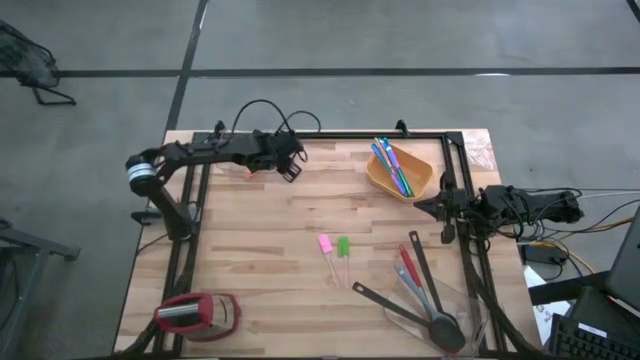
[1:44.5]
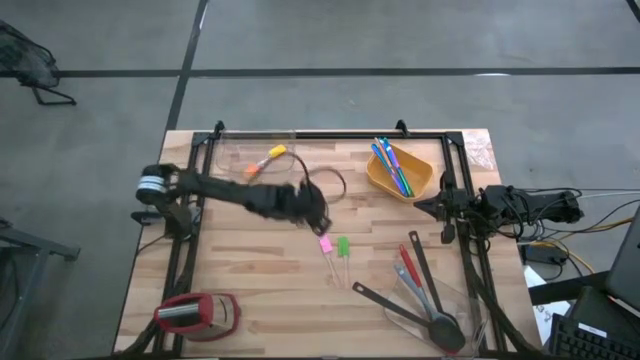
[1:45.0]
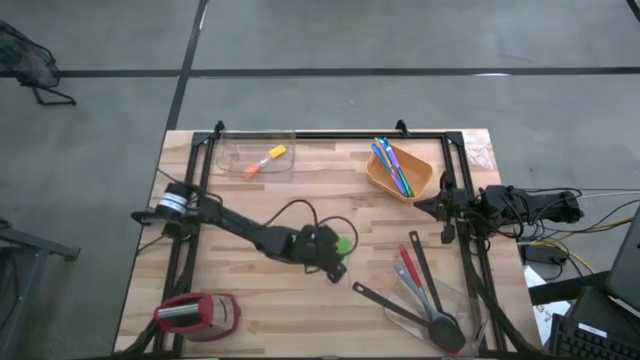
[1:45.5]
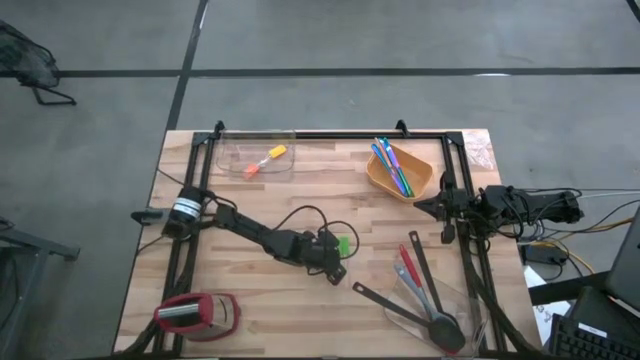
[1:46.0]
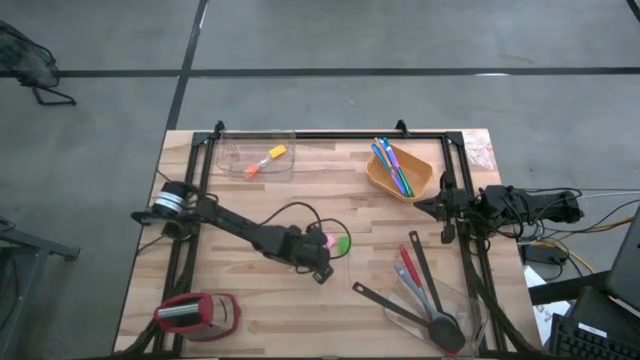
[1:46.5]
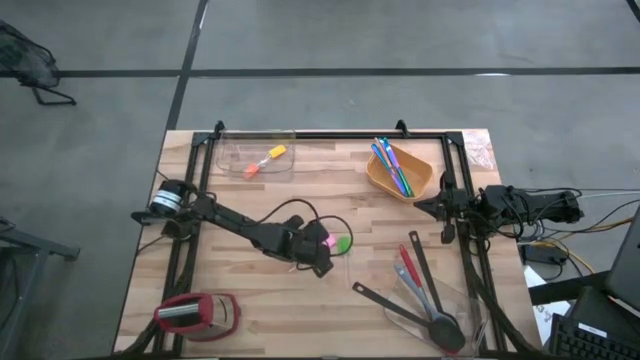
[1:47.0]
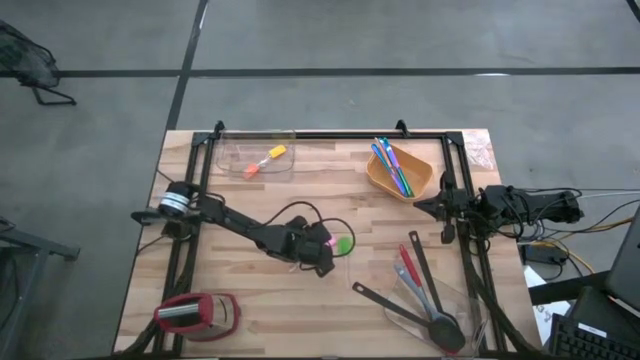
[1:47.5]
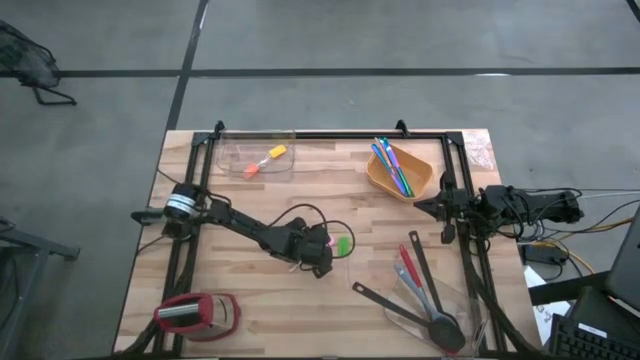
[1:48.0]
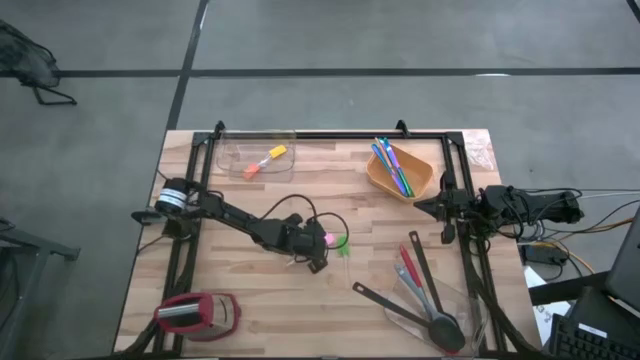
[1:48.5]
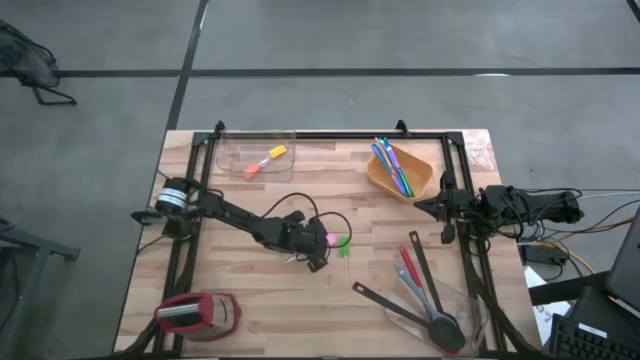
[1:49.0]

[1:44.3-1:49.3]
Task: Pick & Place Kitchen Items
Put the pink spatula into the top transparent bin

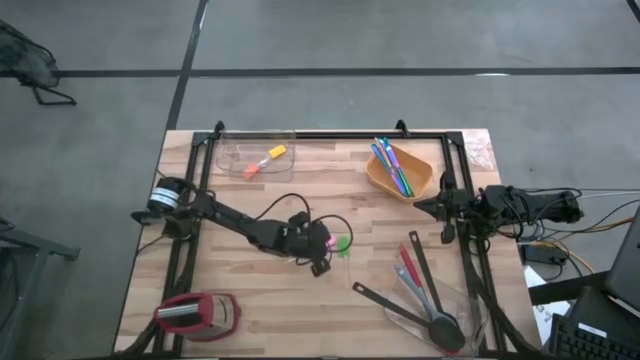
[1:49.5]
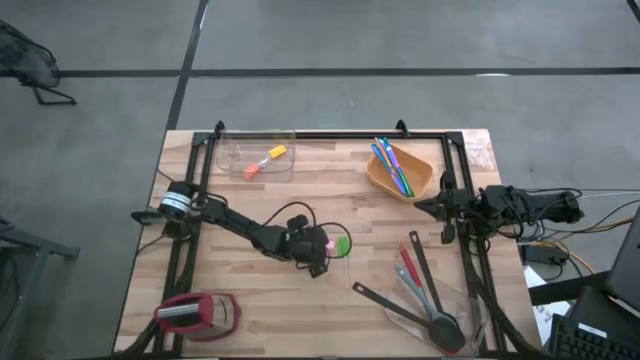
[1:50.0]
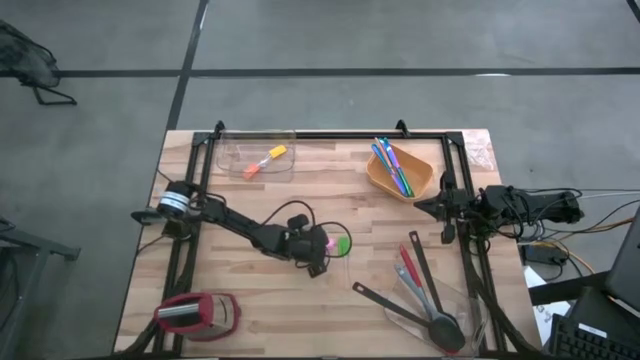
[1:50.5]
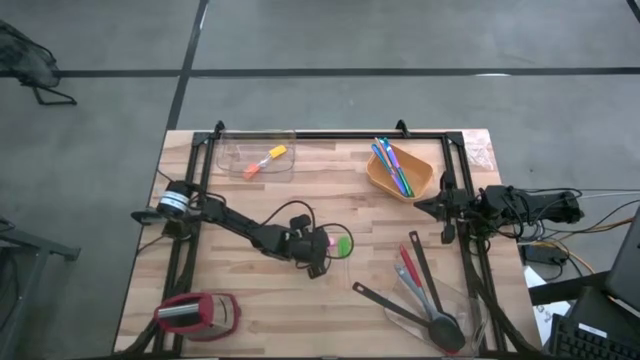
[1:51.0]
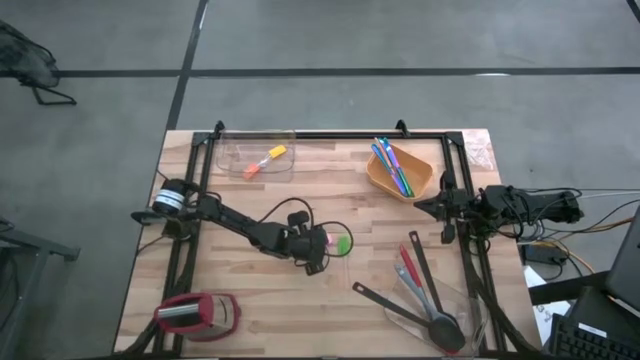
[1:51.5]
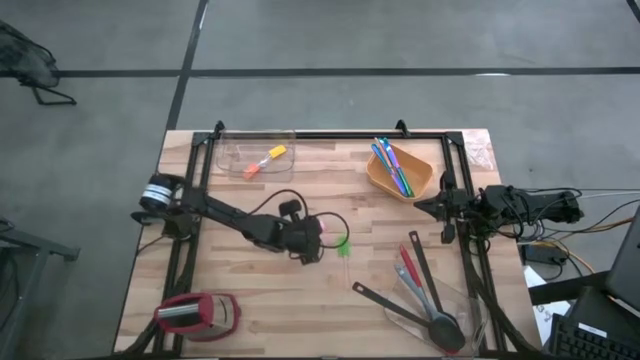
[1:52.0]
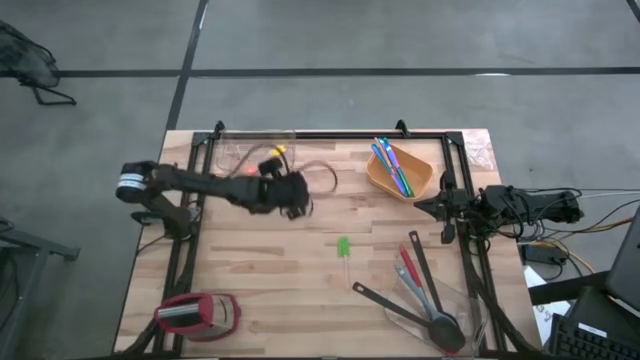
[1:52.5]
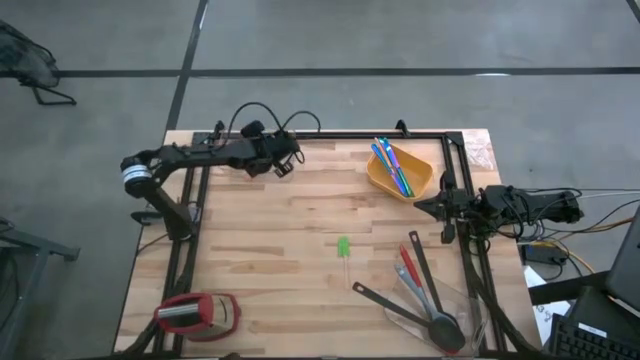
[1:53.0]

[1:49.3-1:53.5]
Put the pink spatula into the top transparent bin

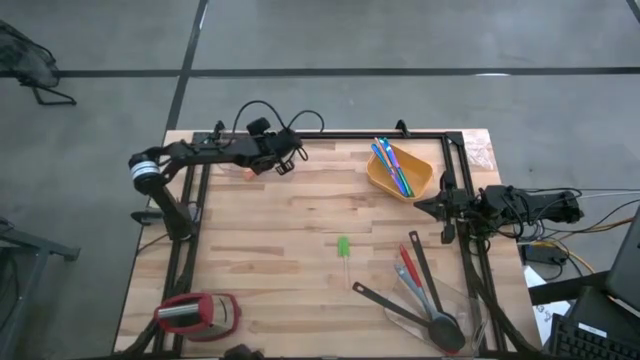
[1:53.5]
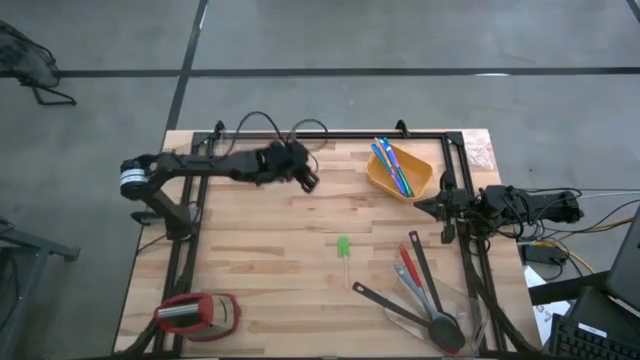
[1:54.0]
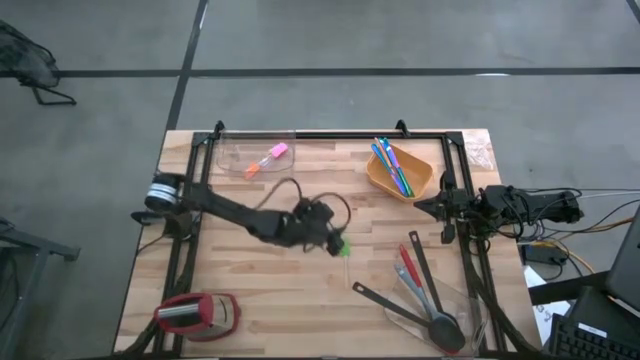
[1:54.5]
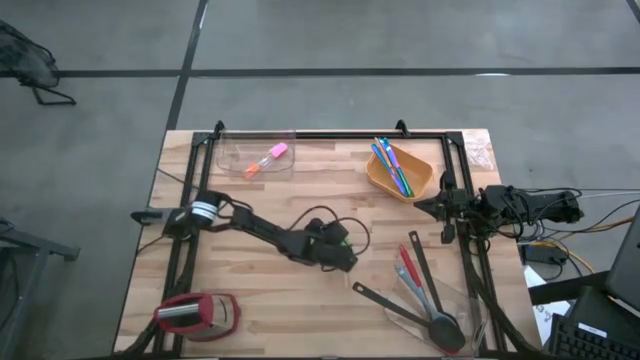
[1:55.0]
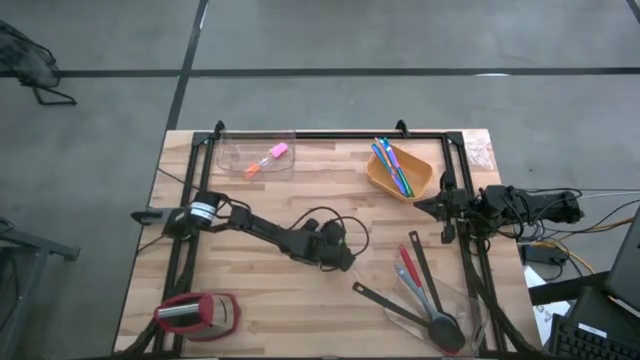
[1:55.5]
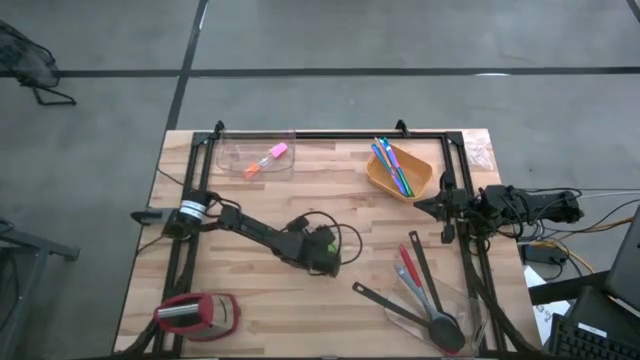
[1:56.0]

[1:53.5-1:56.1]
Put the green spatula into the top transparent bin

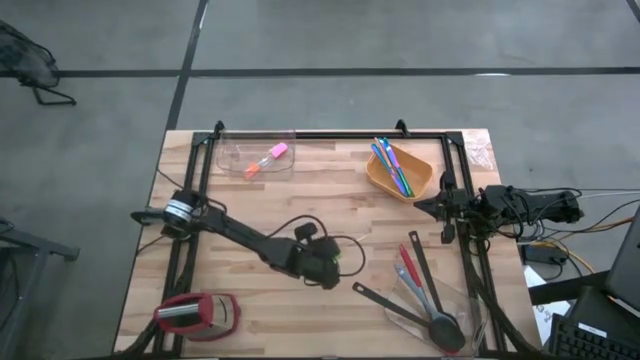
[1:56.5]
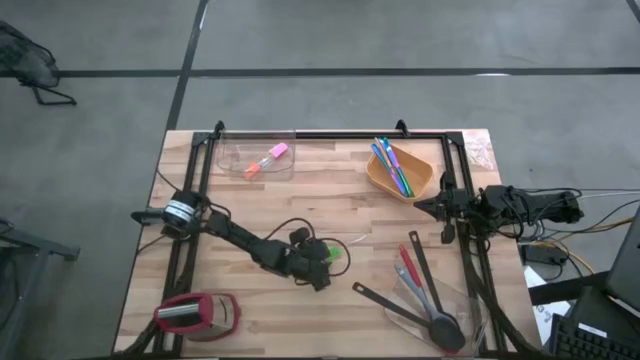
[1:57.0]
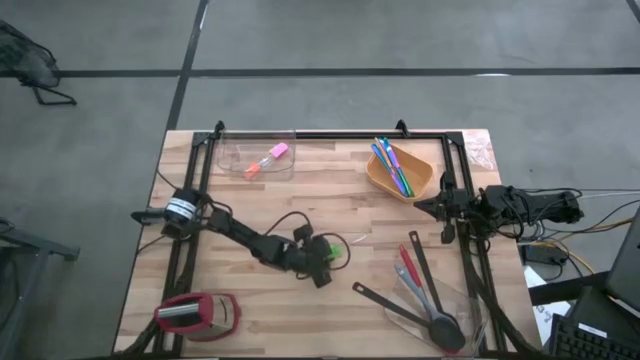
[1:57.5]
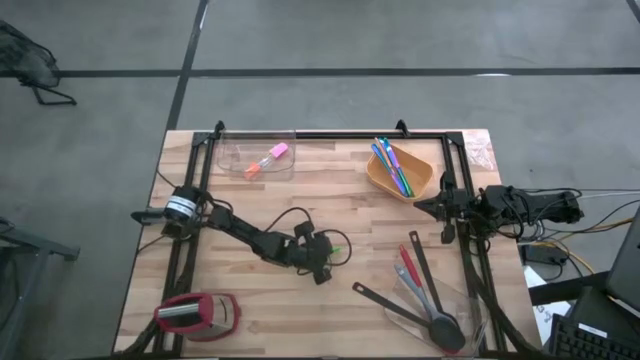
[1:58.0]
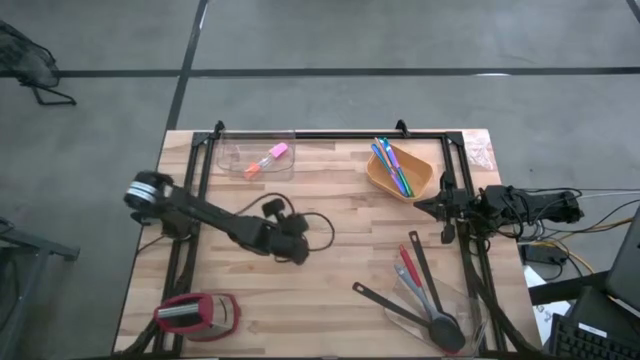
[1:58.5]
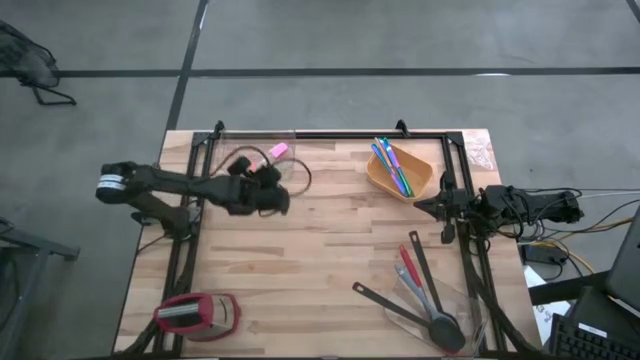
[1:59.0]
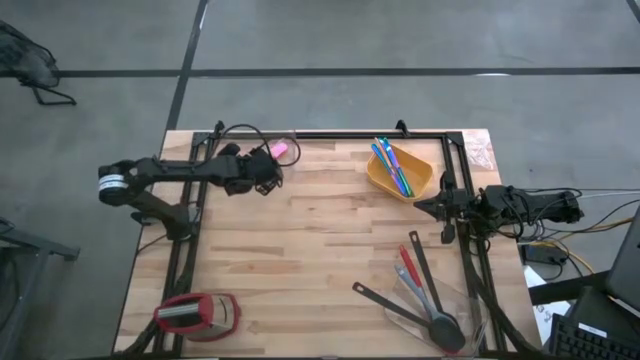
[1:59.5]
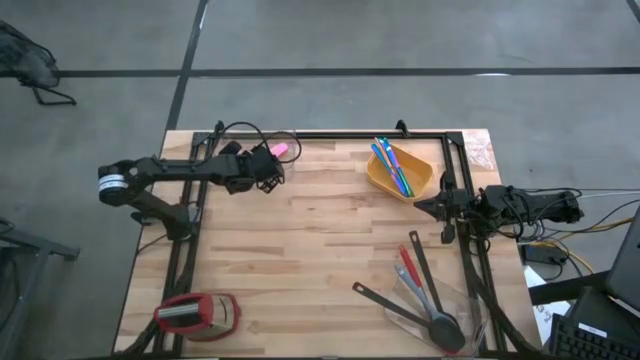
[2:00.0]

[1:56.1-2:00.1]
Put the green spatula into the top transparent bin

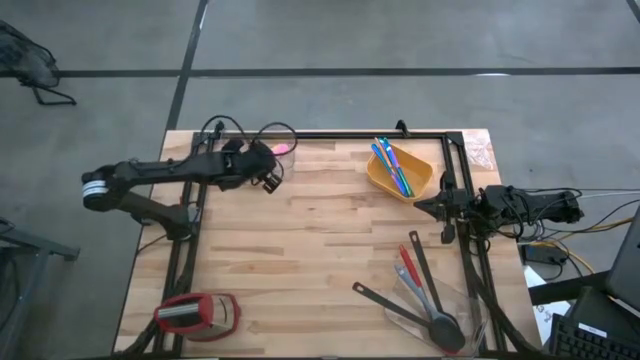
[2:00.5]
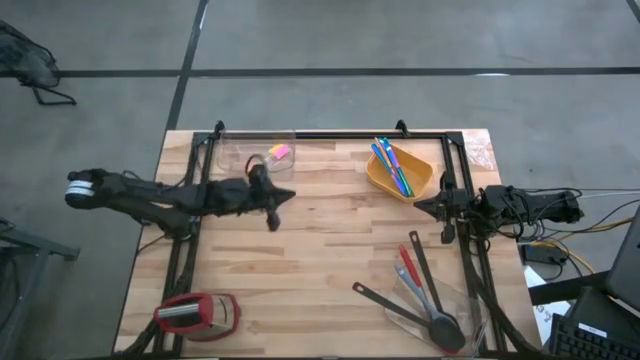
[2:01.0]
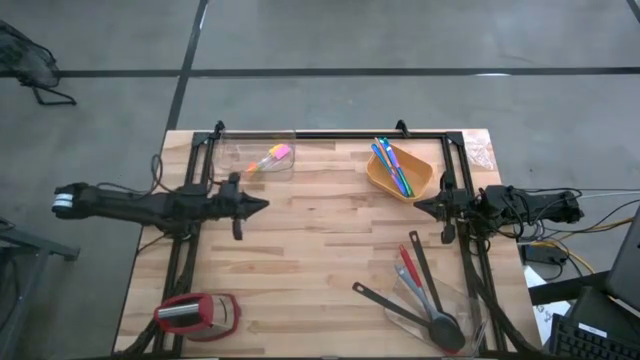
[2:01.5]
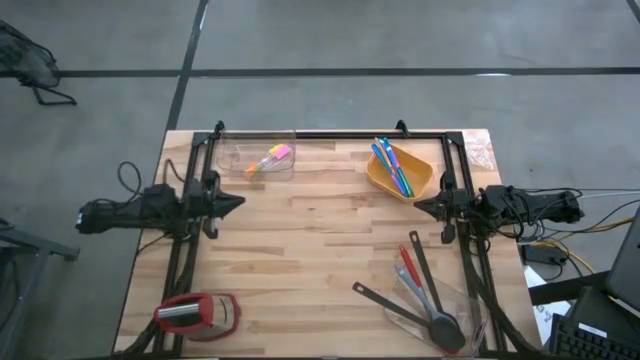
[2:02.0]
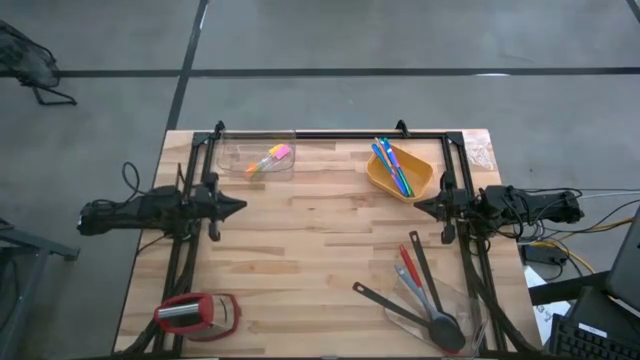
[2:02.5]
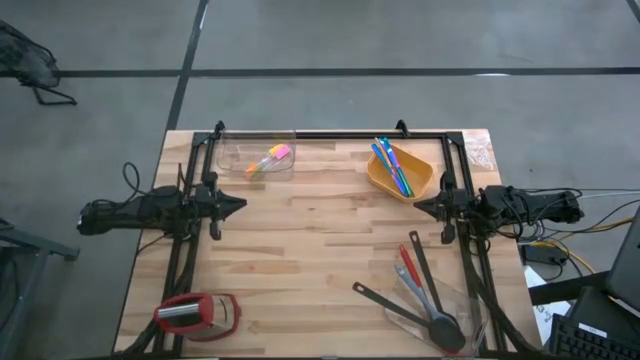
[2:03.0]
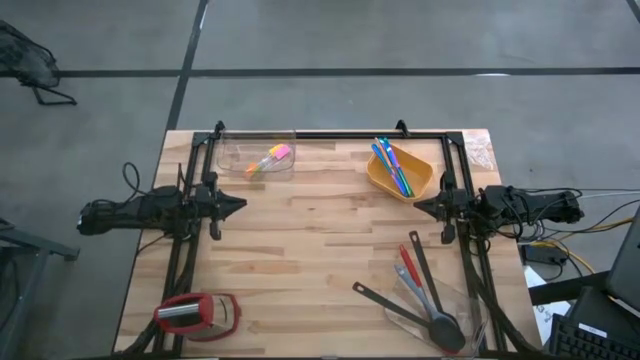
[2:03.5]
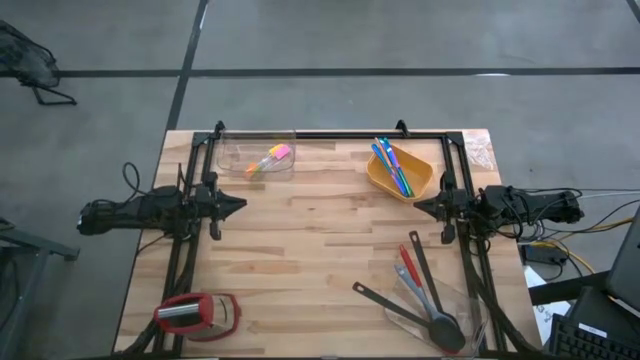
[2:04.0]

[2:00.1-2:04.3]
Return to Home Position
